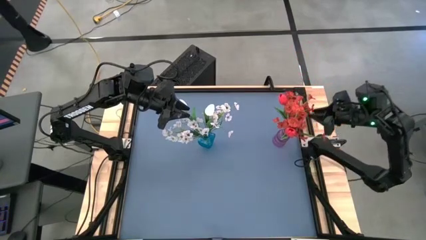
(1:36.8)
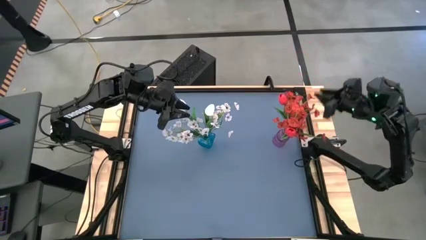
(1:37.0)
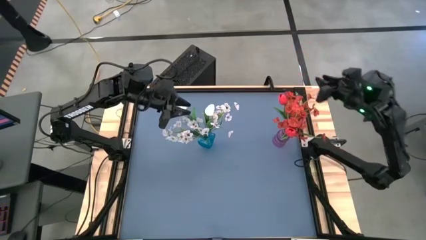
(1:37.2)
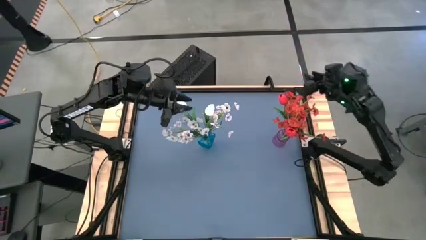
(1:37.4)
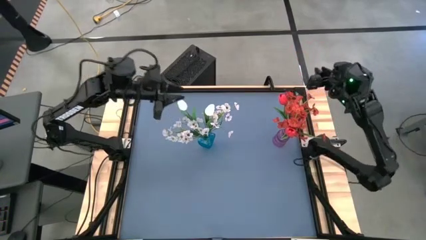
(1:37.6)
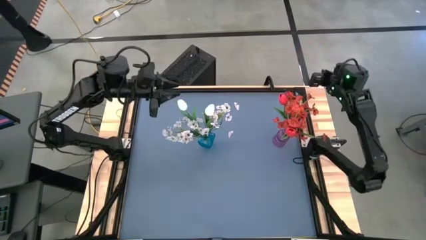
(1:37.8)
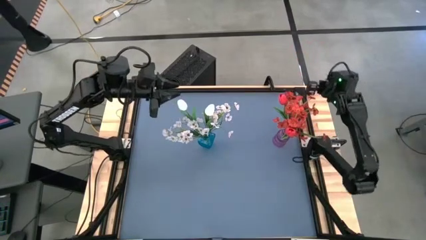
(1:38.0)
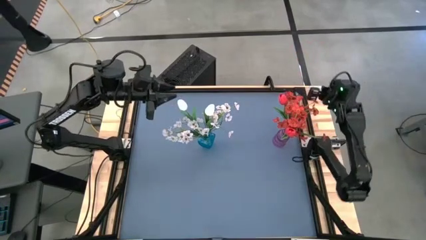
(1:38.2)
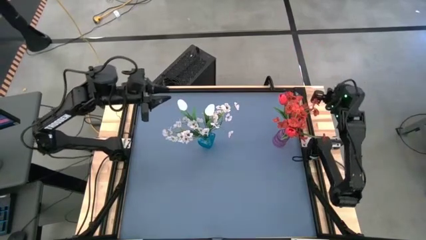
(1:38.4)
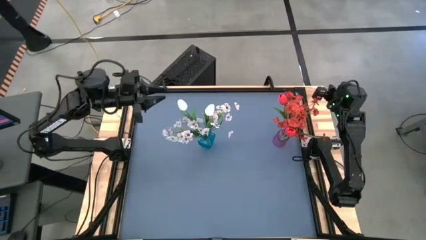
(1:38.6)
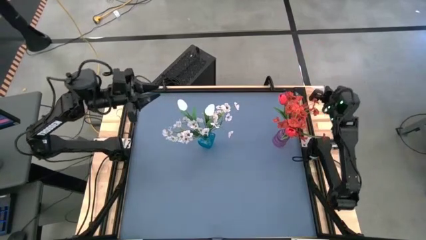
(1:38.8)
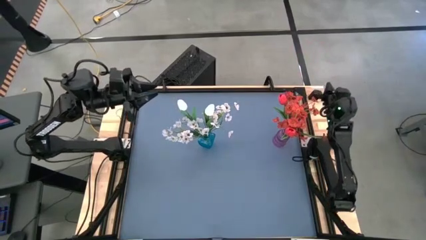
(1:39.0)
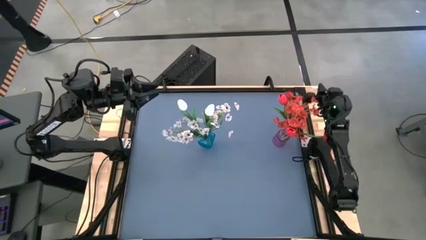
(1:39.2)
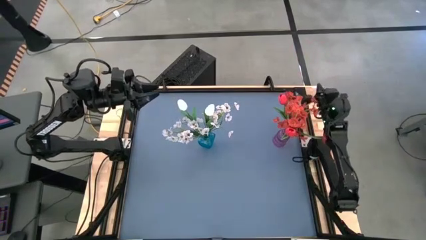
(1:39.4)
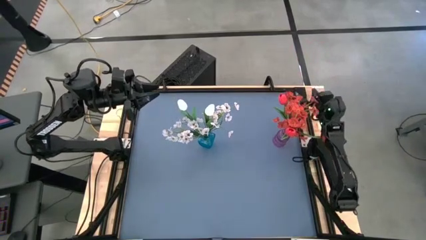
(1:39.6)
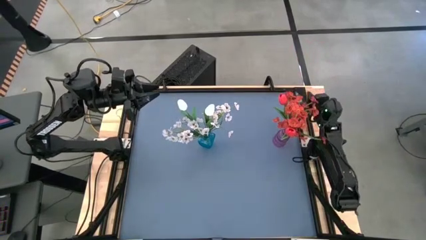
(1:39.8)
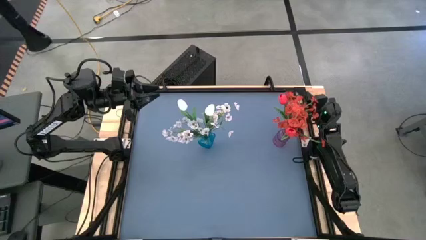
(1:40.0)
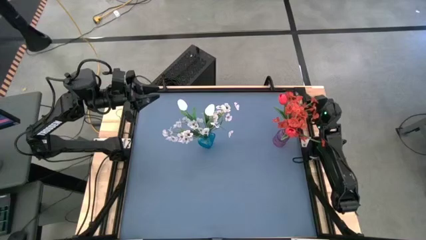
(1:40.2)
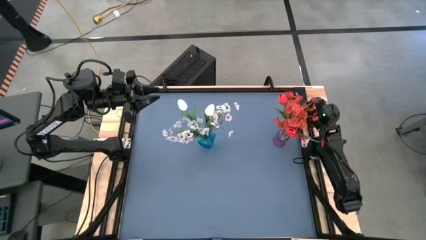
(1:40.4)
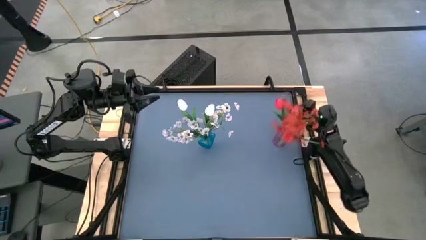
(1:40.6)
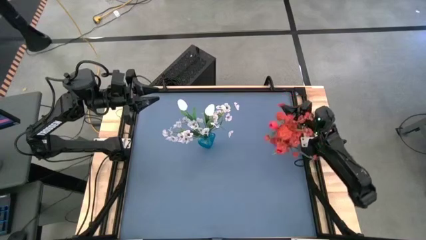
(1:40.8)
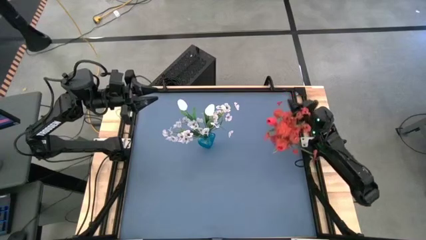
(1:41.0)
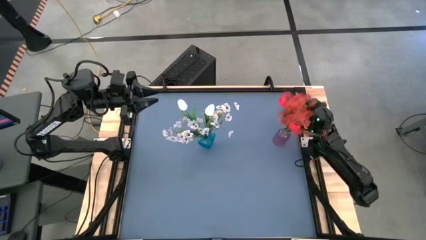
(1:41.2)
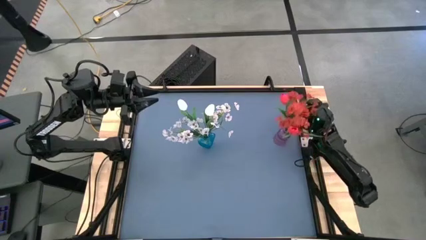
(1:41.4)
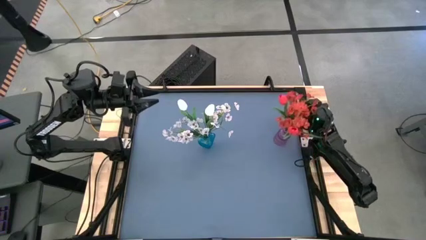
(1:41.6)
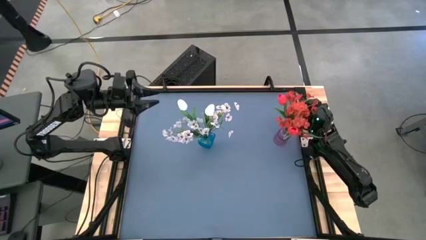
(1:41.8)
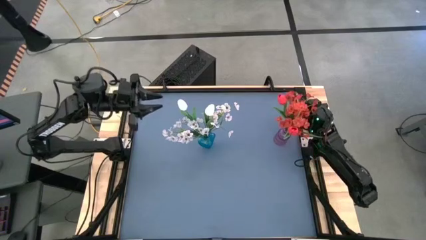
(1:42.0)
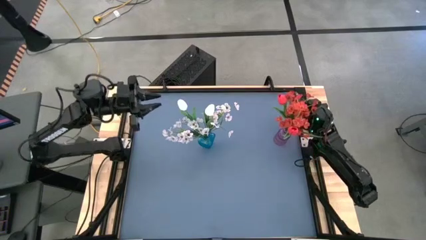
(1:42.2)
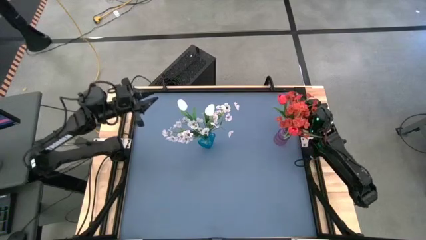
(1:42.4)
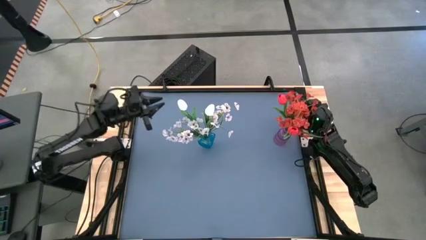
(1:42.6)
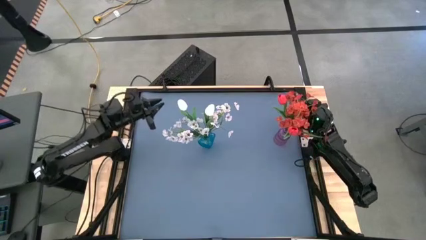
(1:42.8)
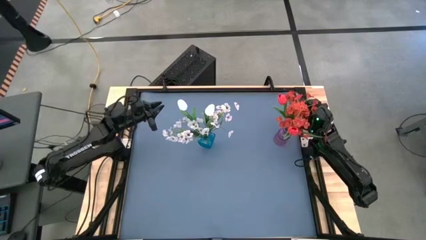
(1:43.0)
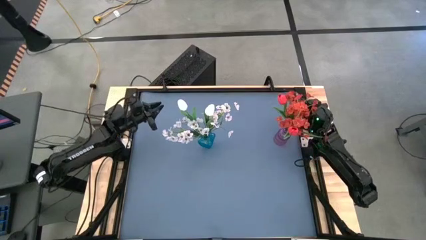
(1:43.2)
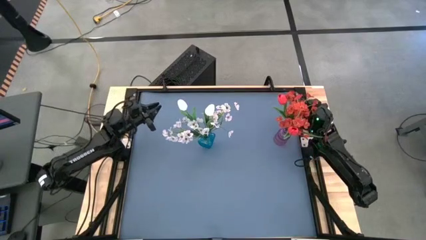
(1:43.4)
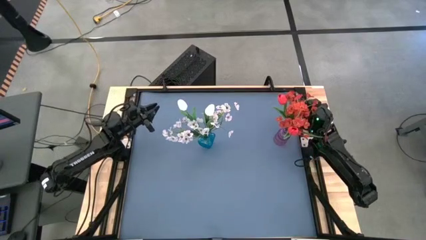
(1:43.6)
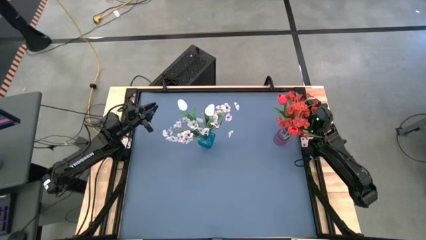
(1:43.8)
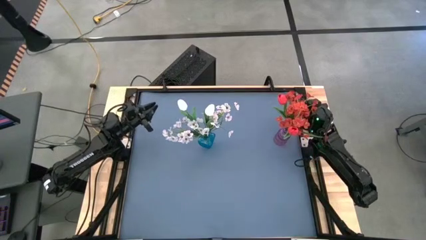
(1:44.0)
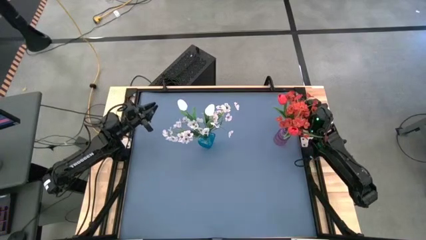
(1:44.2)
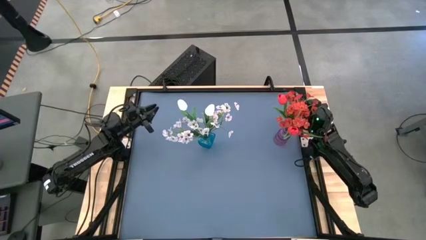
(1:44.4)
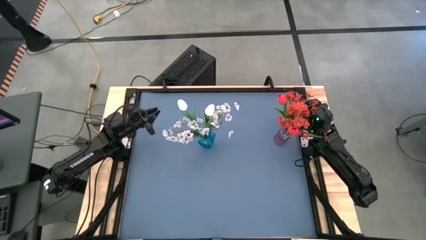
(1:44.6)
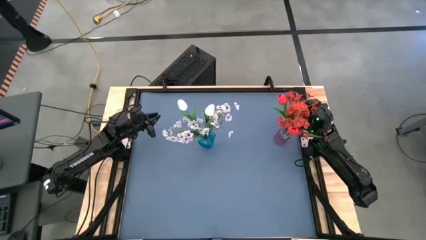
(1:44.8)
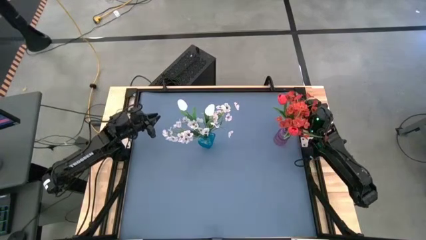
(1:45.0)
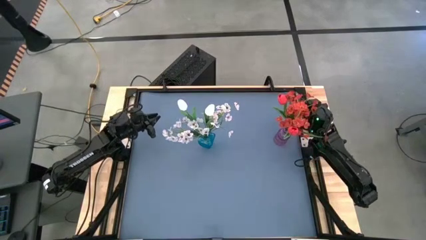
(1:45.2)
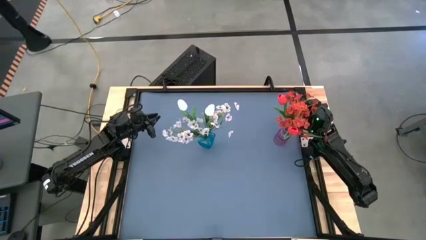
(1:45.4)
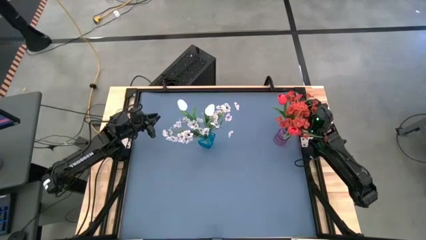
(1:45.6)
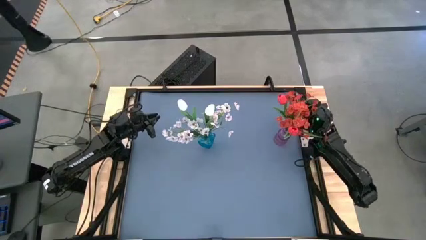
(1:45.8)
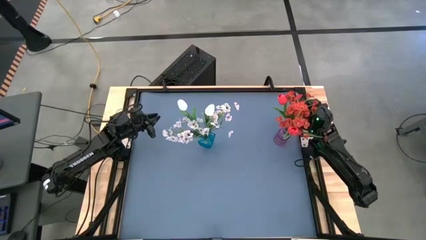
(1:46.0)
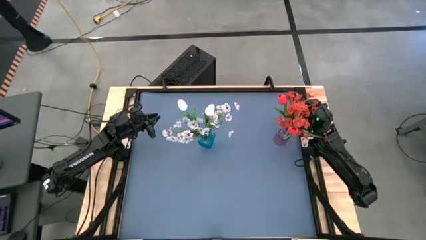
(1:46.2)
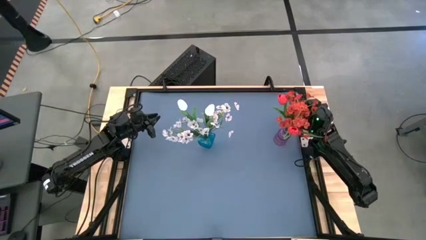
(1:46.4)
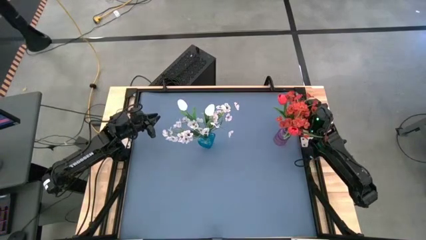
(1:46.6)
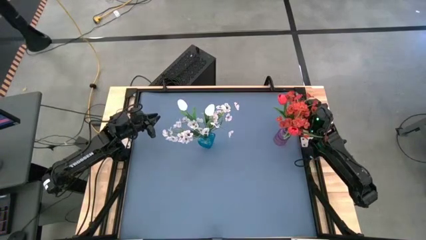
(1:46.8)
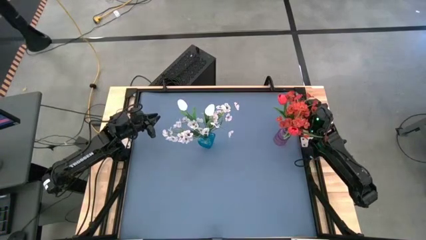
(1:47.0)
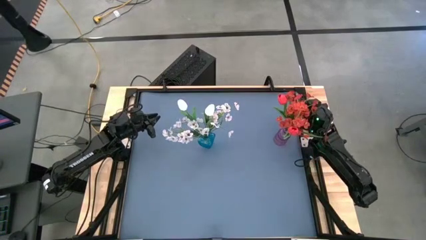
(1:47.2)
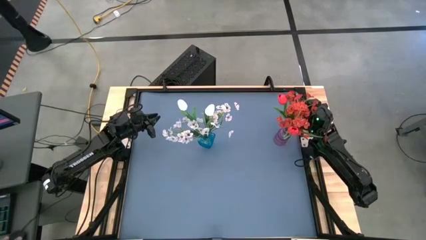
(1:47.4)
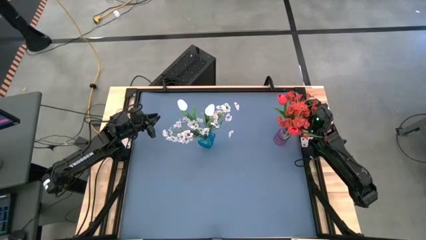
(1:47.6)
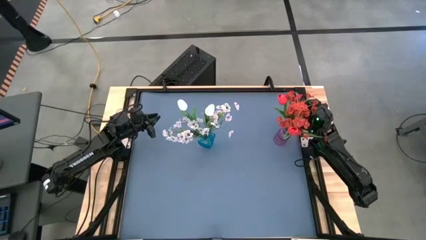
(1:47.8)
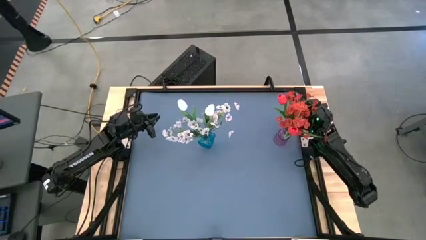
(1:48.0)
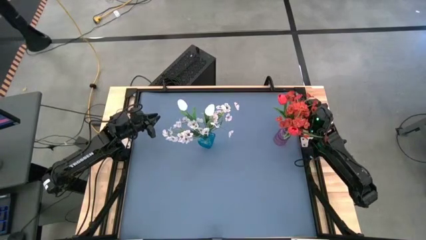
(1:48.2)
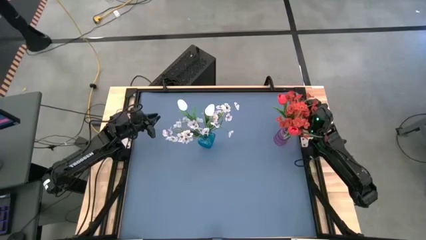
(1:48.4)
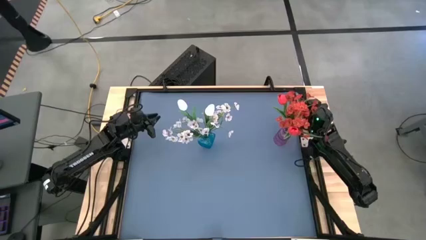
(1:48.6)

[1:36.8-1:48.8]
Task: Sort flowers into vase by color
Return to Home Position

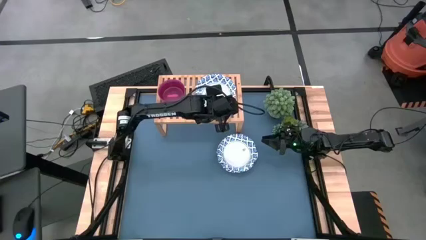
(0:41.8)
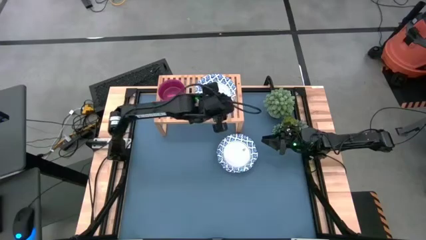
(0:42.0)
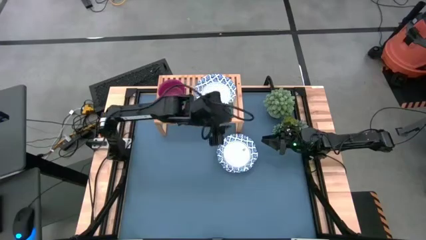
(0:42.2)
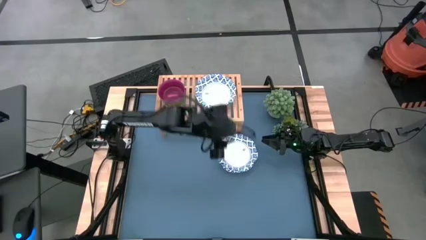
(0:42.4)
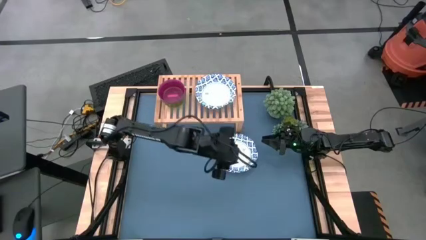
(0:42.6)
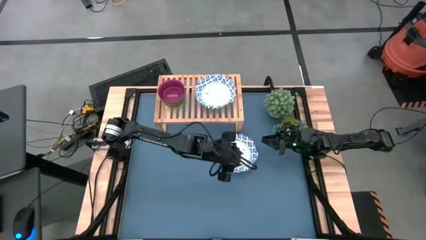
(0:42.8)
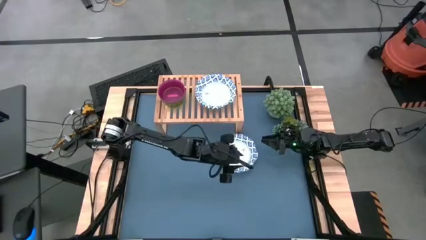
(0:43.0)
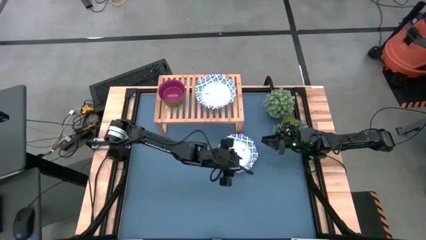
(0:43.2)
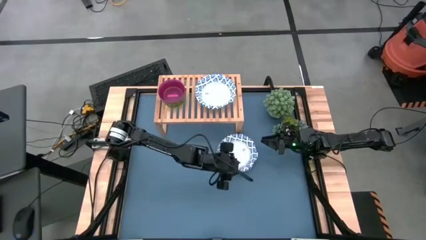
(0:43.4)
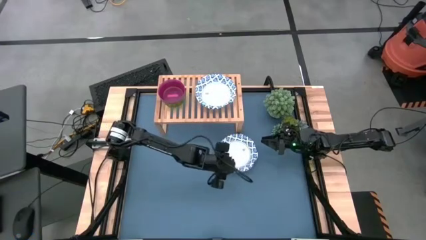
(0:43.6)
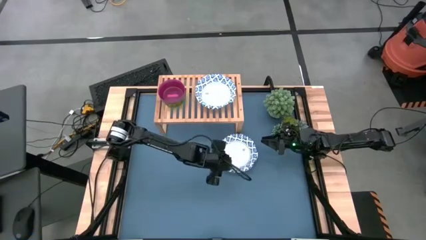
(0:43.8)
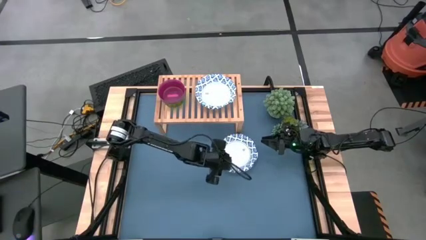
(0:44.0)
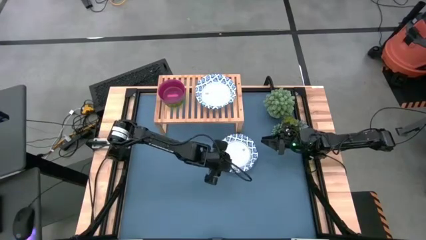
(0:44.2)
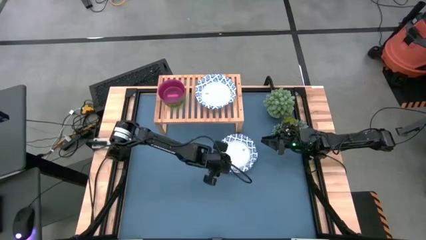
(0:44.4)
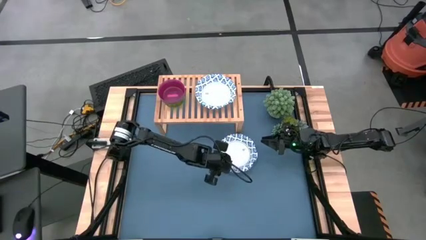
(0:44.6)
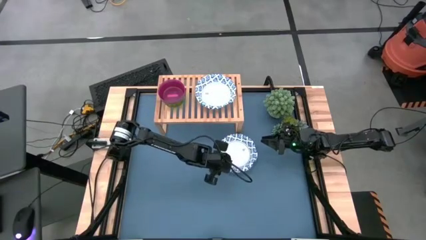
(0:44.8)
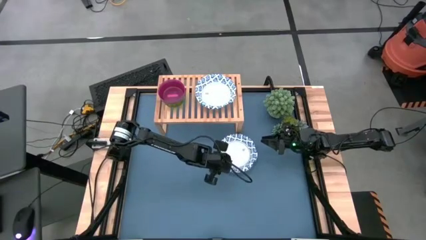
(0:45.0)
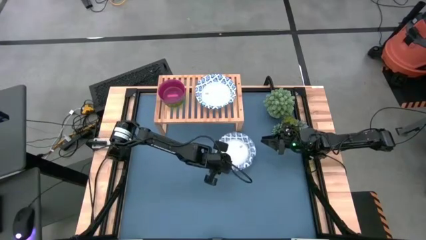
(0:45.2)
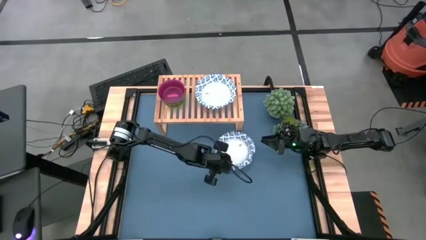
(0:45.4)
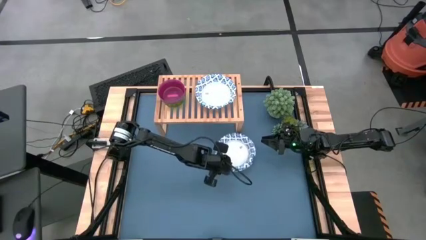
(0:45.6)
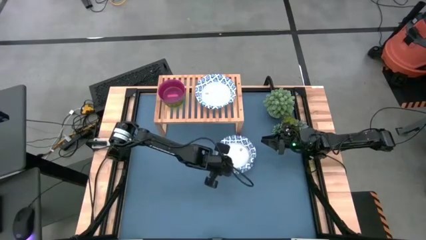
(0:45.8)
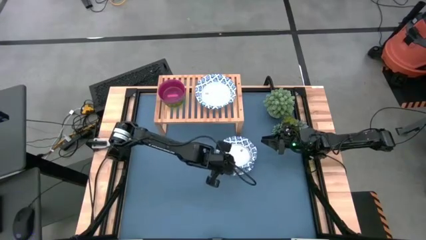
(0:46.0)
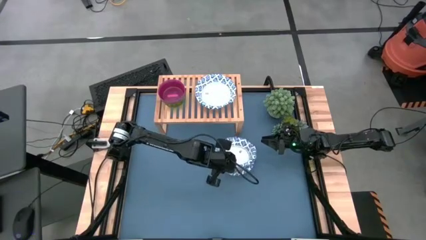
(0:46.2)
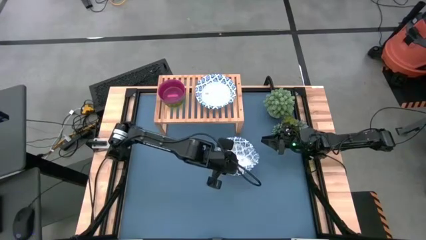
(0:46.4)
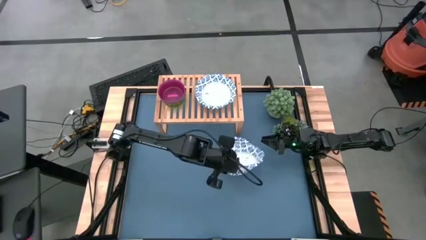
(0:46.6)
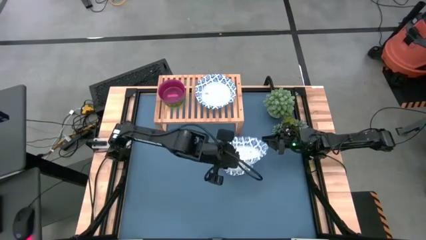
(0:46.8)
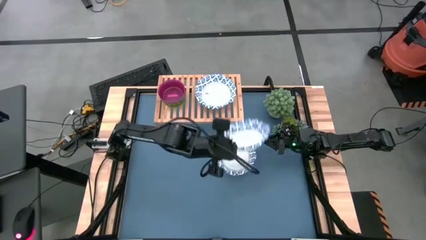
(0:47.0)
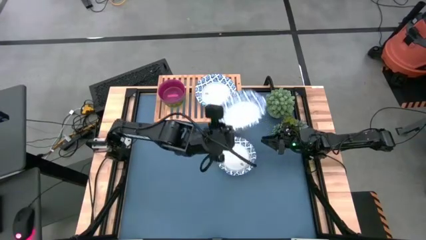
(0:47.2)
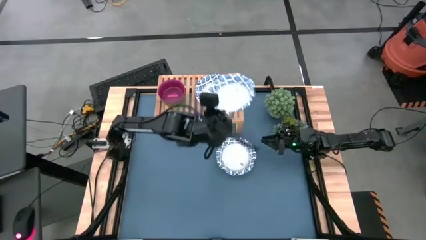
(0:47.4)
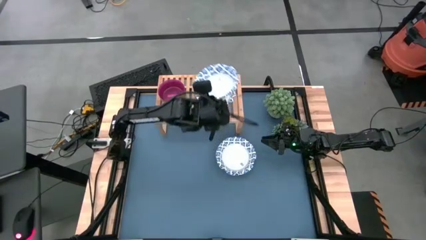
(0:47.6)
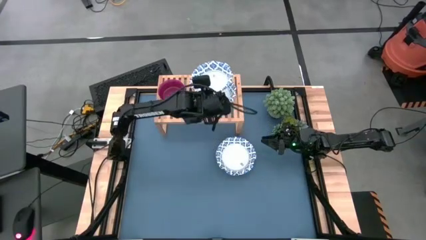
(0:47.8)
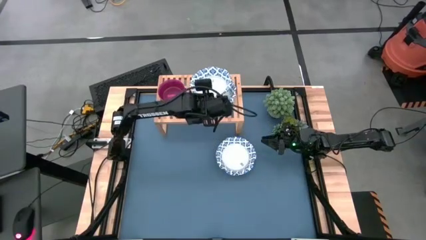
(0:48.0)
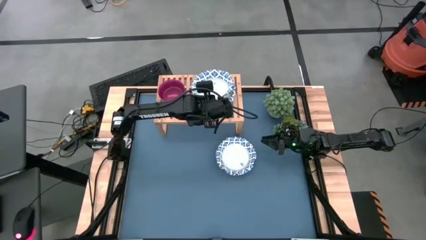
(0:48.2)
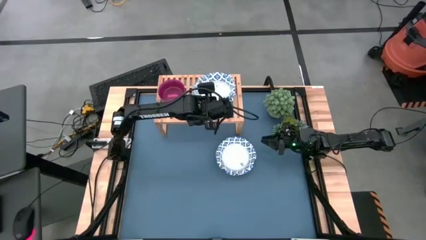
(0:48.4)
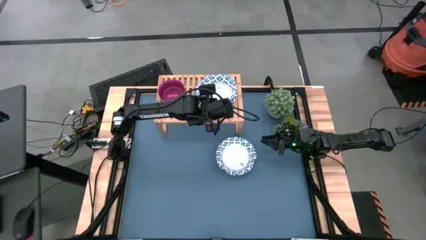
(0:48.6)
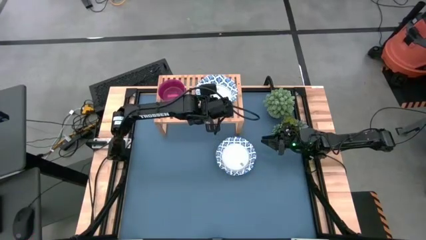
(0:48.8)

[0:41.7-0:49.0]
Task: Place and stack bowls onto a shelf
Stack the blue patterned bowl on top of the other blue patterned bowl on the shelf
